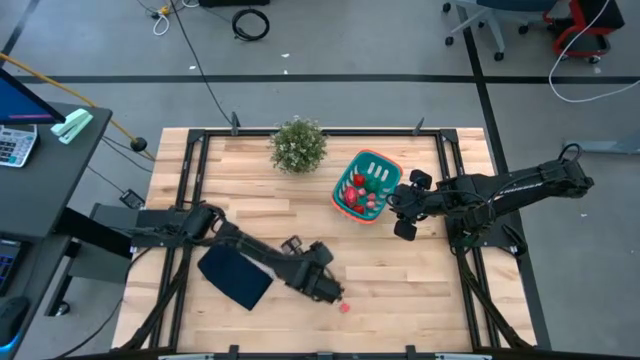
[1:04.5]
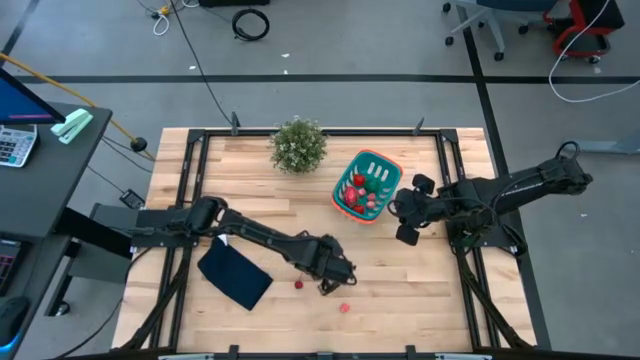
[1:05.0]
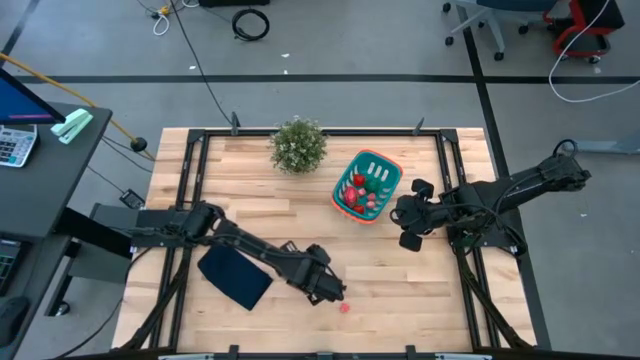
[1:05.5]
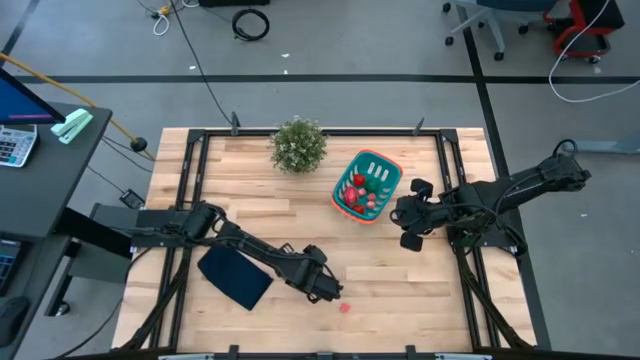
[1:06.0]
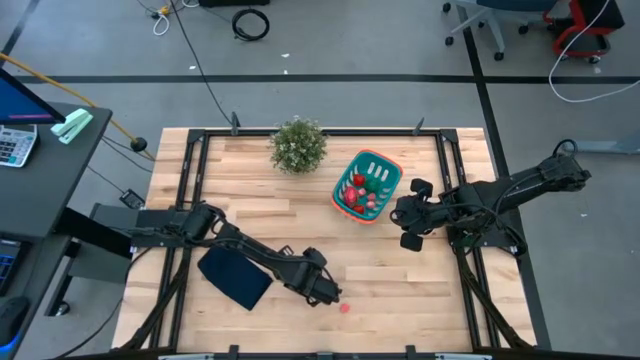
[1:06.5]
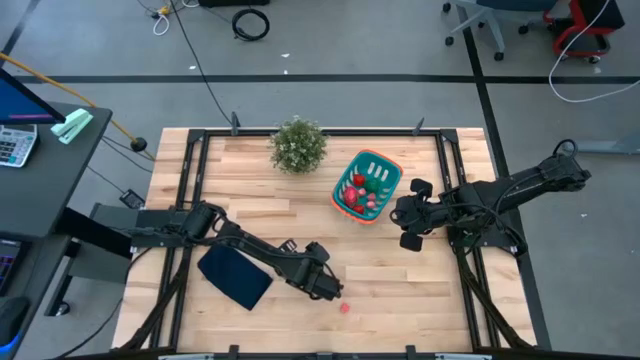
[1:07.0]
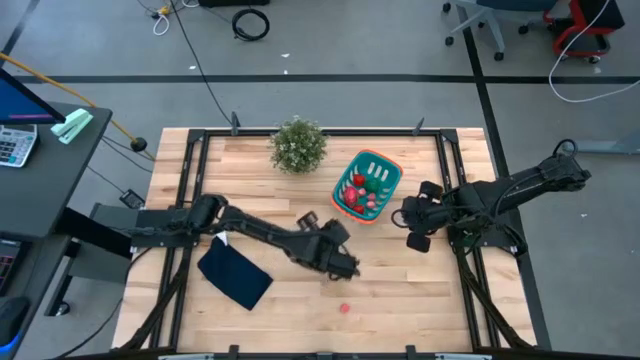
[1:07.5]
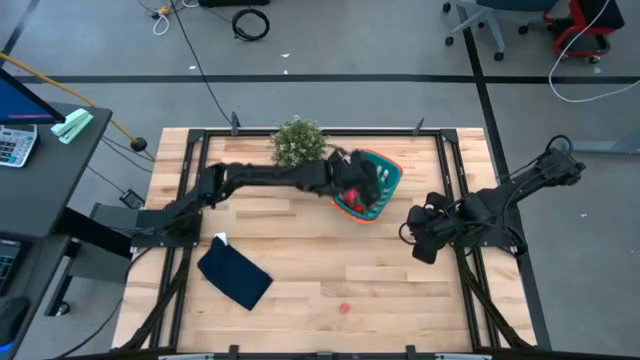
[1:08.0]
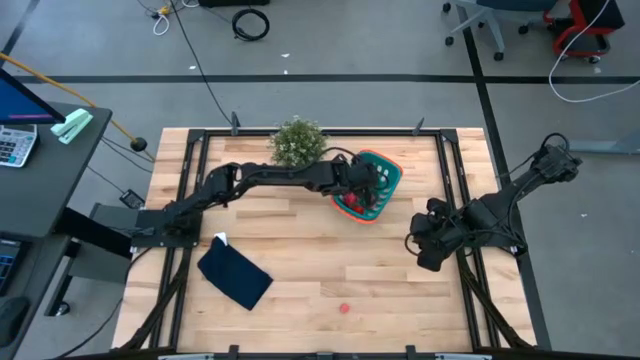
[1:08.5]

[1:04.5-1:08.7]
Task: Pick and placing Produce into tupperware
Put the red cherry into the basket

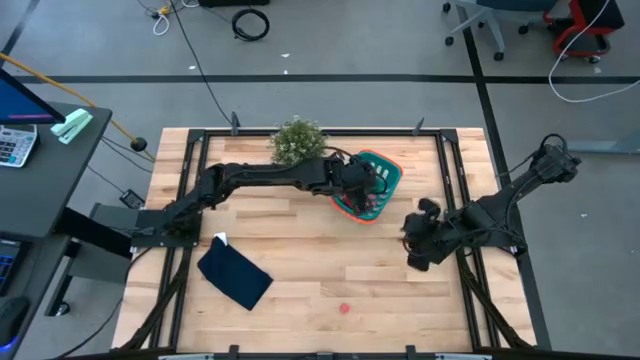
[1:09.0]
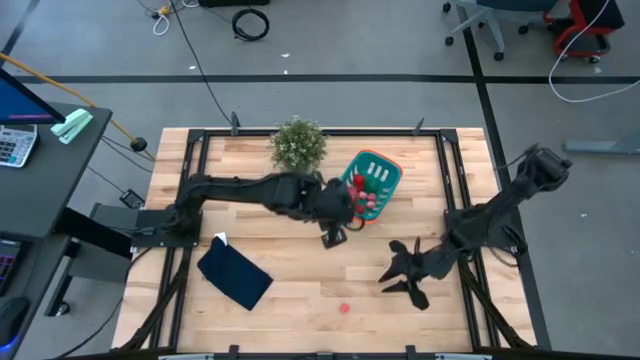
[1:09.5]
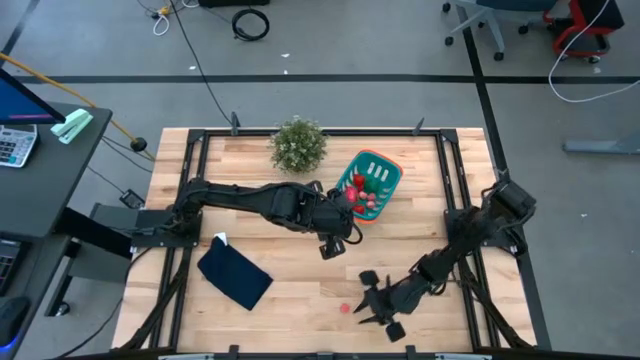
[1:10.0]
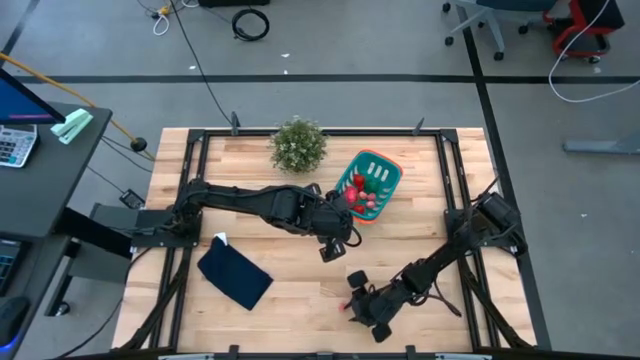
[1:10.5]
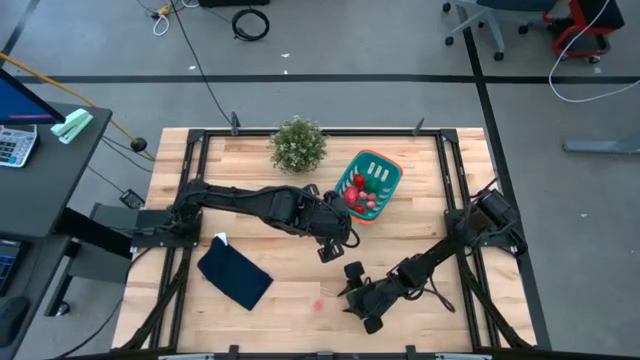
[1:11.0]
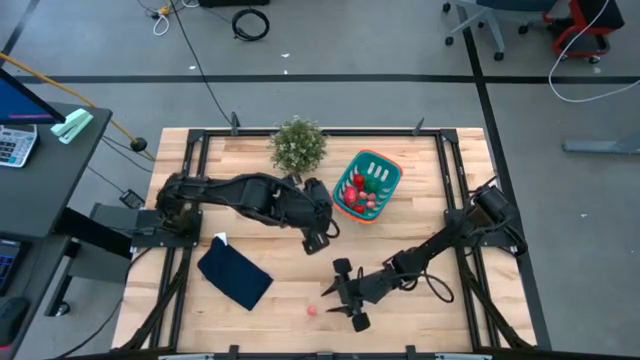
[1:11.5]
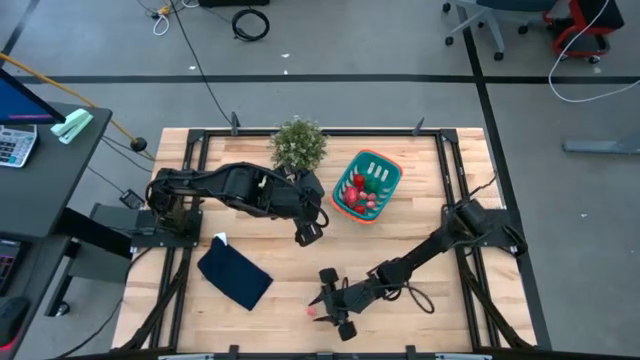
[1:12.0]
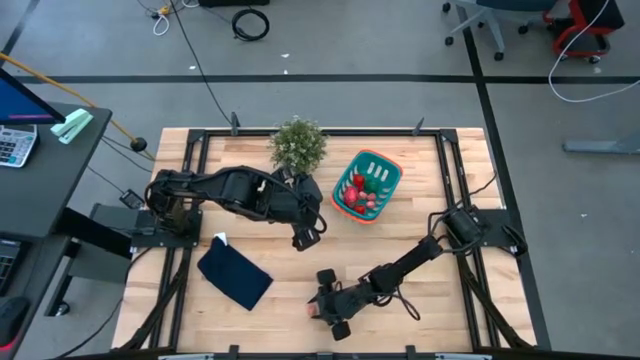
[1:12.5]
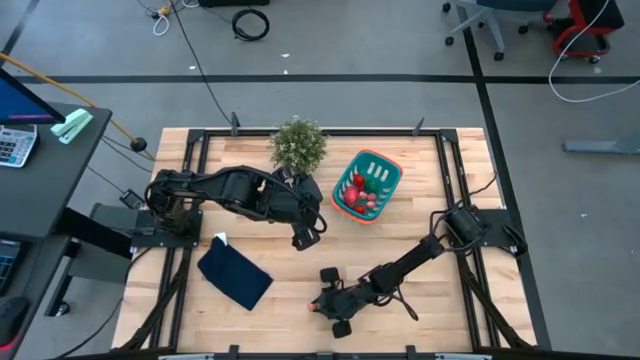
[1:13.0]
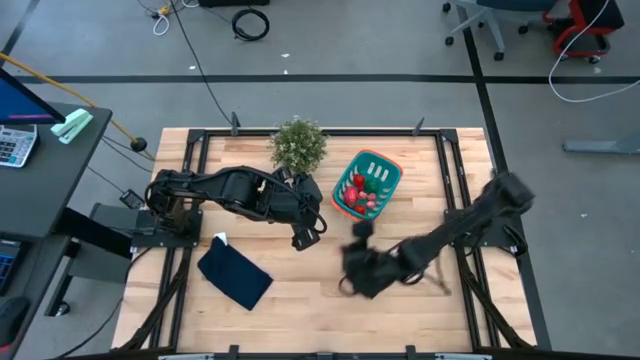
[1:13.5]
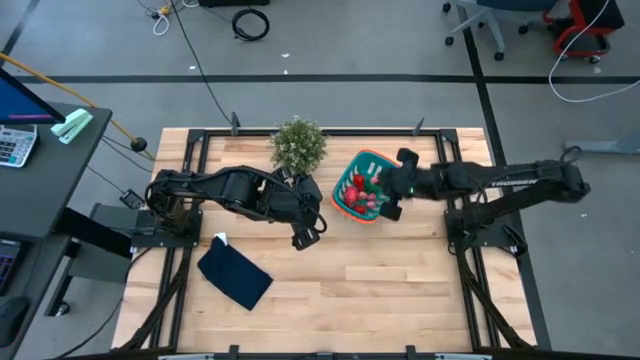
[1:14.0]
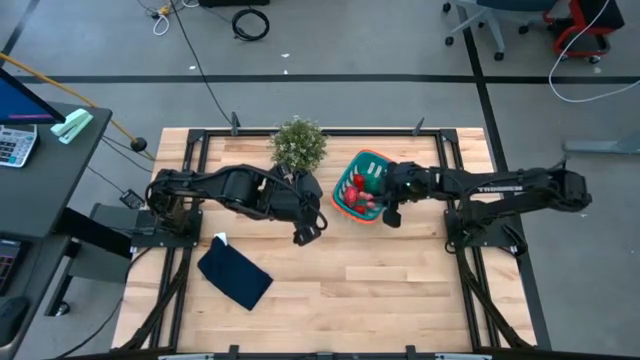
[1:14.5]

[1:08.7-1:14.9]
Put the pink peach into the basket

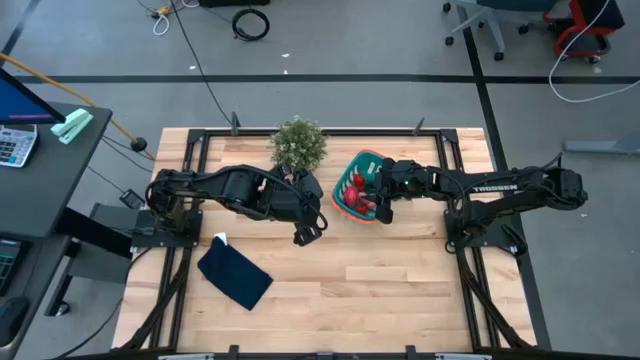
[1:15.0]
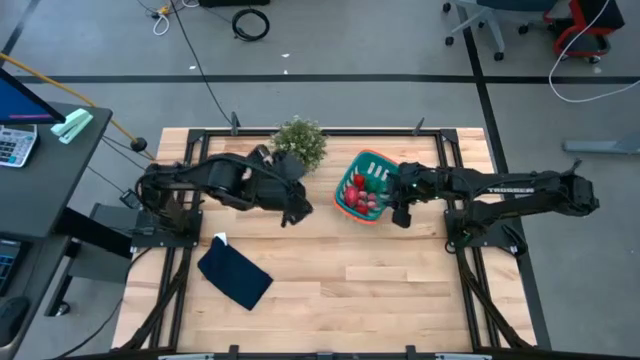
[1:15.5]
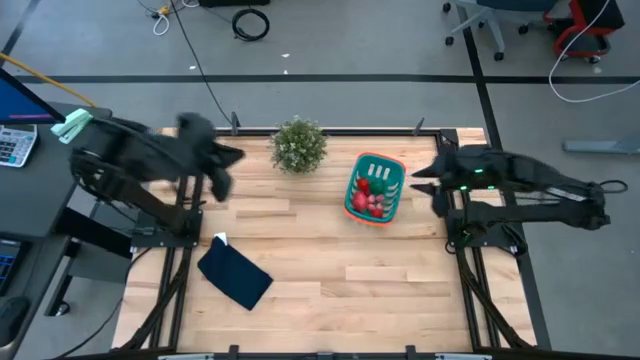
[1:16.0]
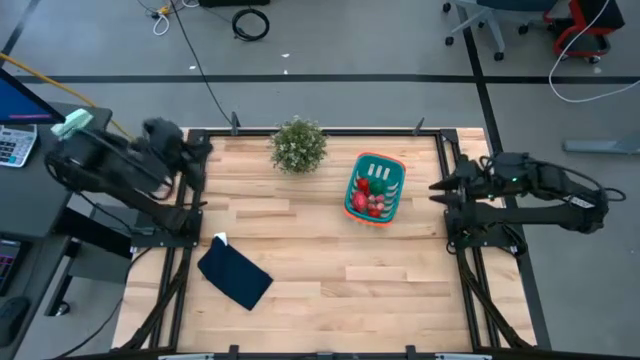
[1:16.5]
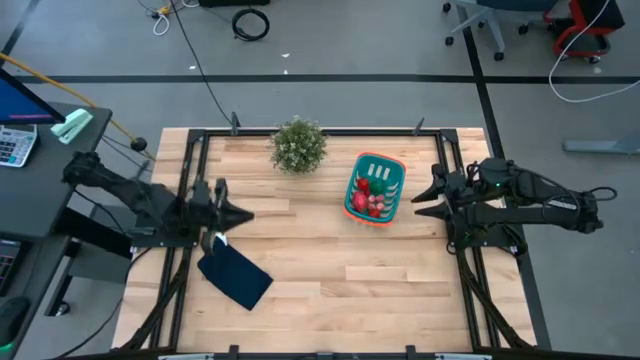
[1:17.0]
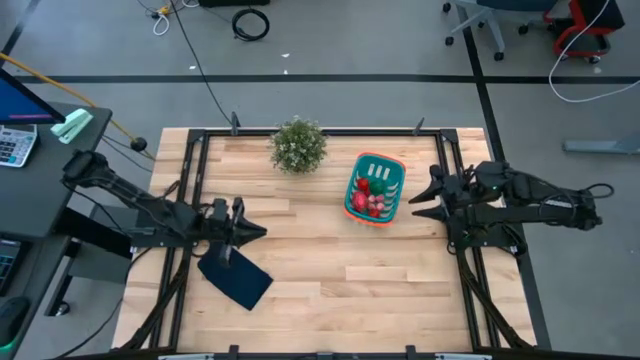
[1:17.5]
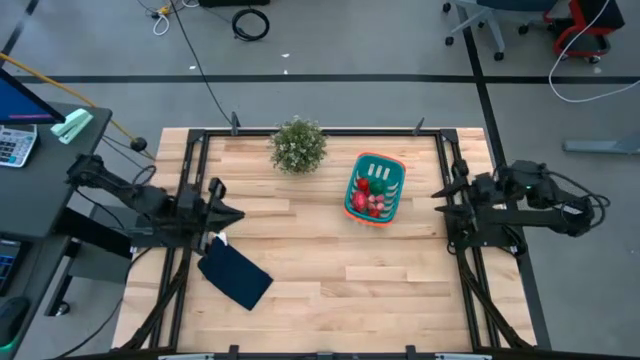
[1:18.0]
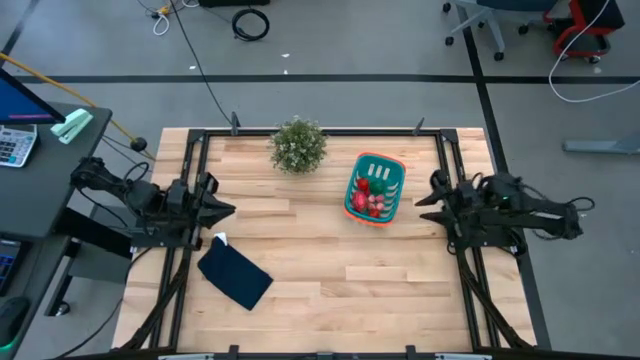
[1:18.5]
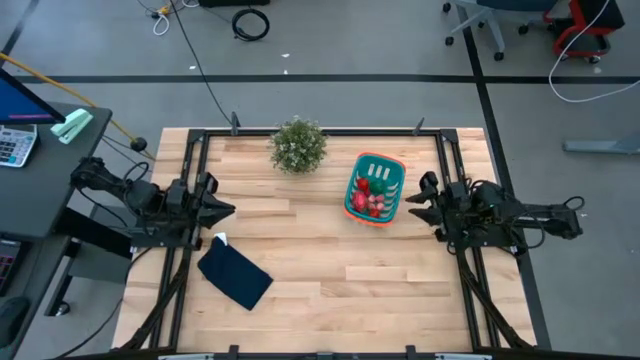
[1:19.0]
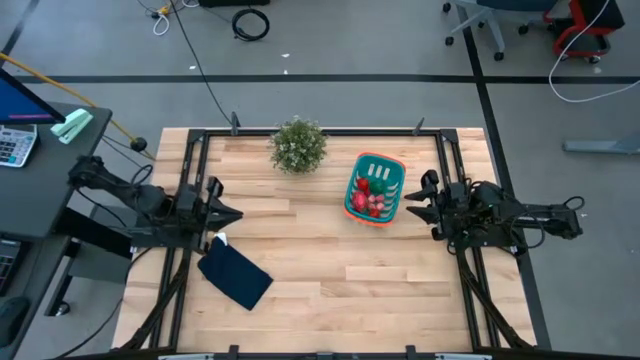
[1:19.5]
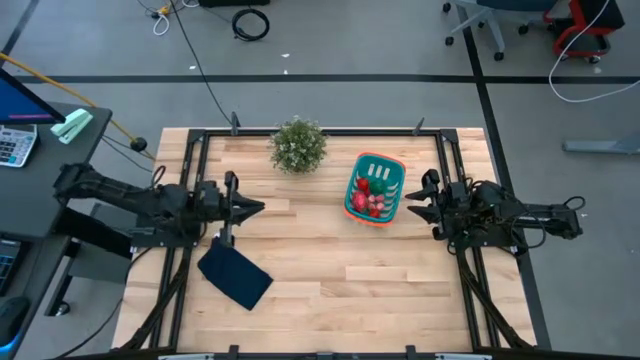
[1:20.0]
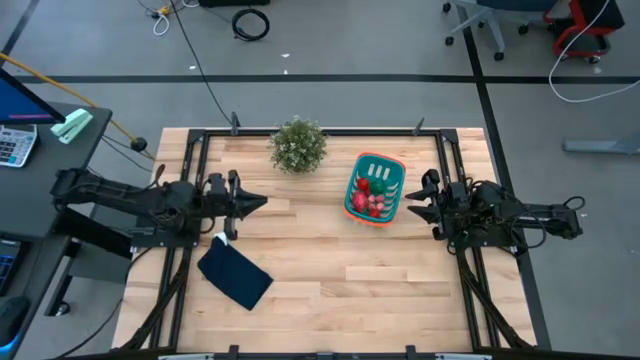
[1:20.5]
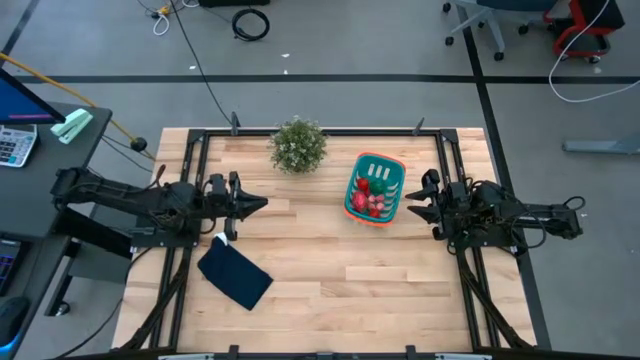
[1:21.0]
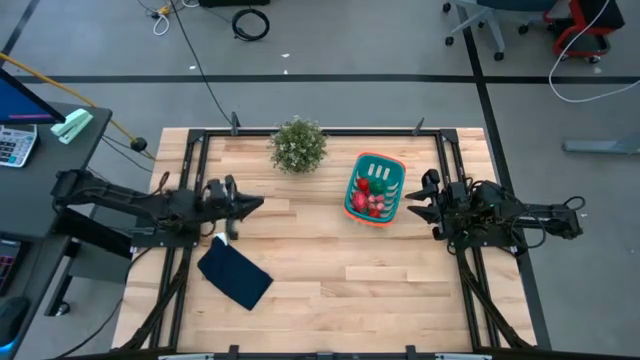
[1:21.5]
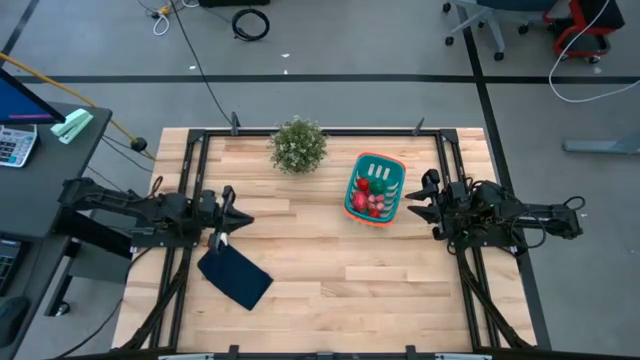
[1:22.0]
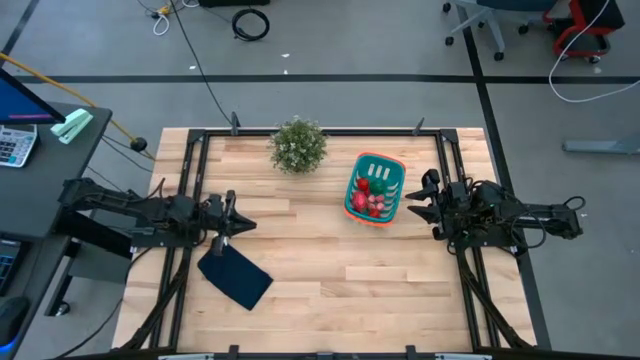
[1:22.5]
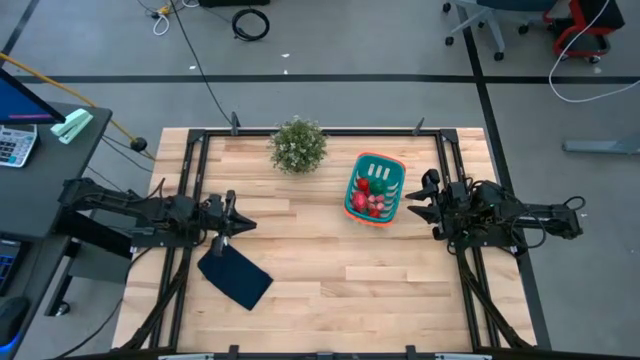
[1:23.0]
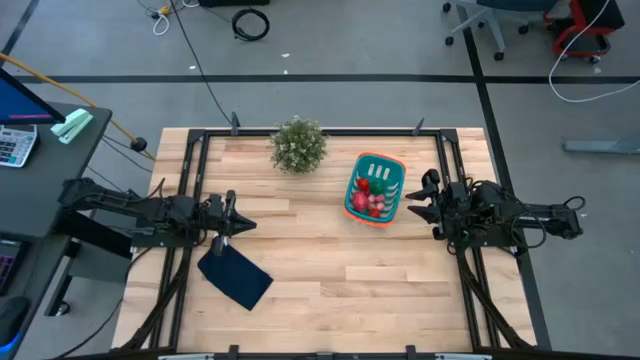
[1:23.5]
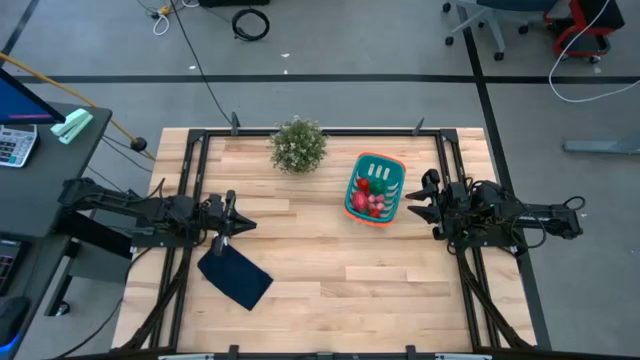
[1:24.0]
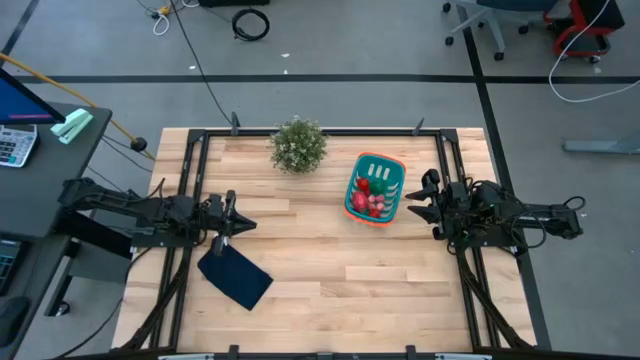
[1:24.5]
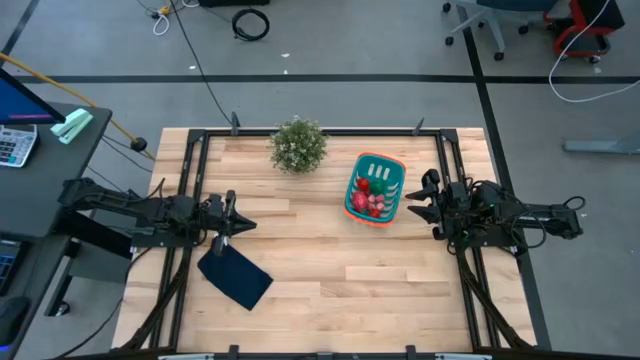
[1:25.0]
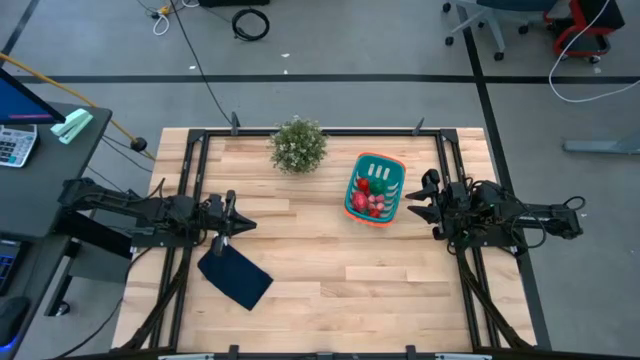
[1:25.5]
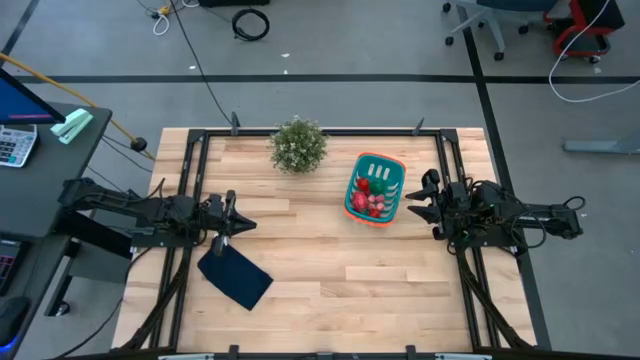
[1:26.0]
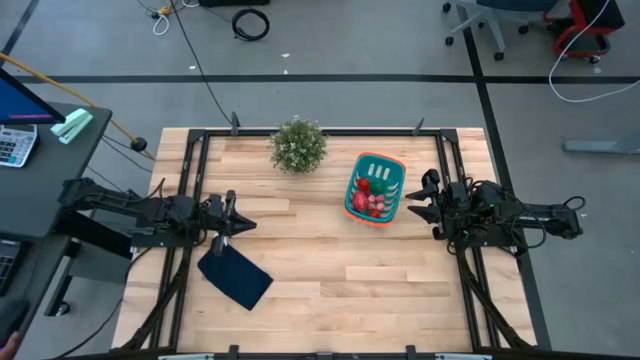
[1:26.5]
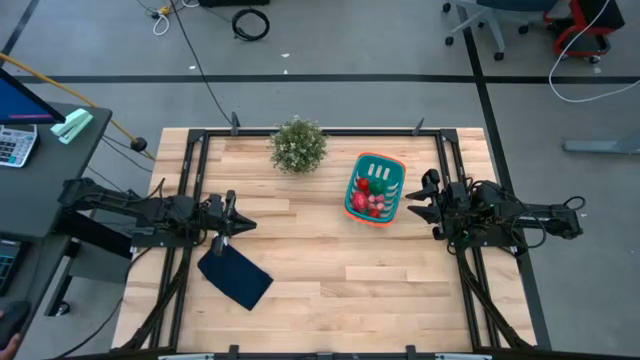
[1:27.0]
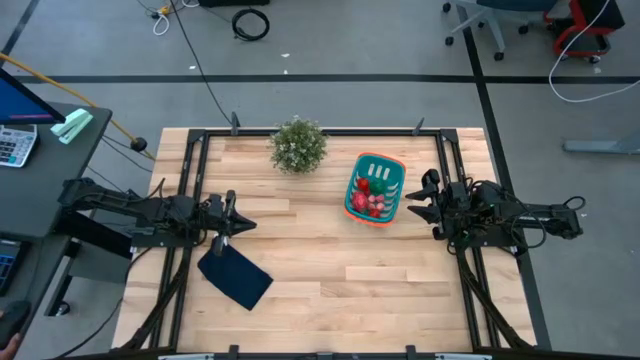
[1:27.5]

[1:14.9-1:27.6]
Return to Home Position
